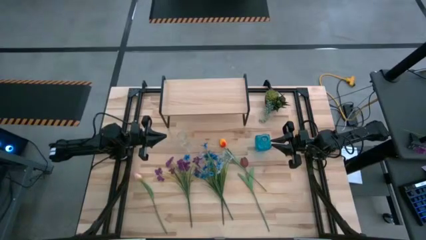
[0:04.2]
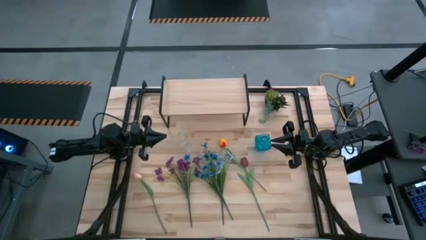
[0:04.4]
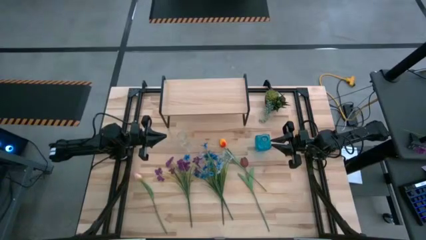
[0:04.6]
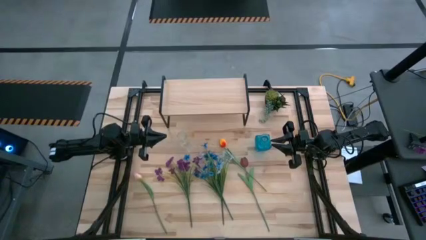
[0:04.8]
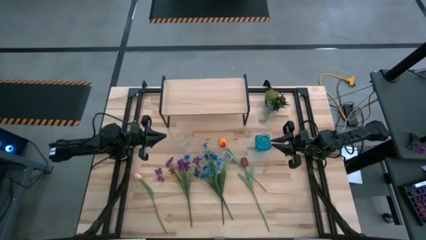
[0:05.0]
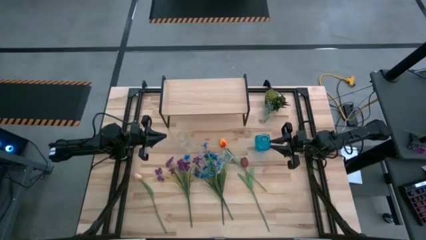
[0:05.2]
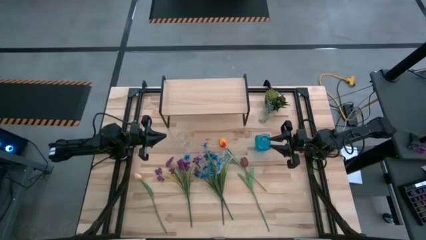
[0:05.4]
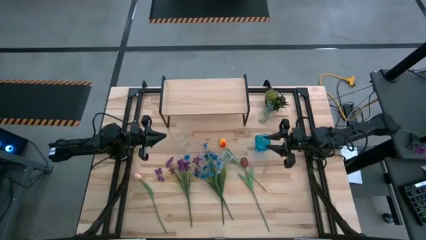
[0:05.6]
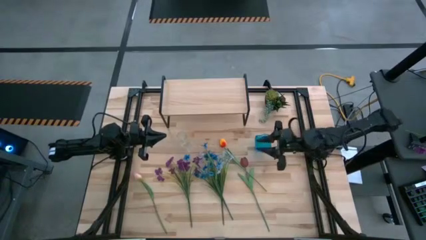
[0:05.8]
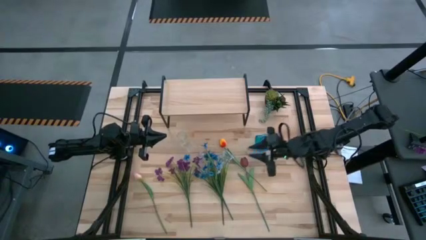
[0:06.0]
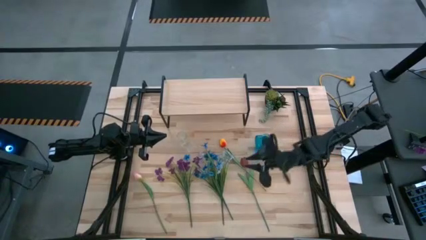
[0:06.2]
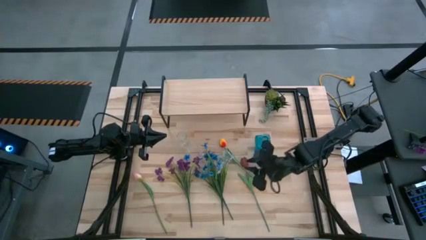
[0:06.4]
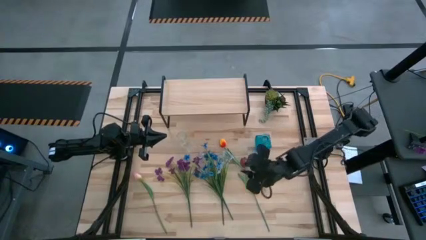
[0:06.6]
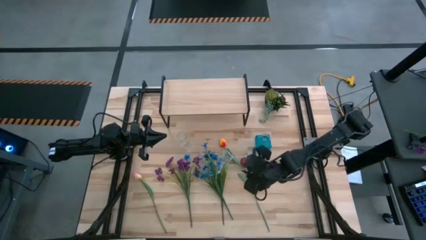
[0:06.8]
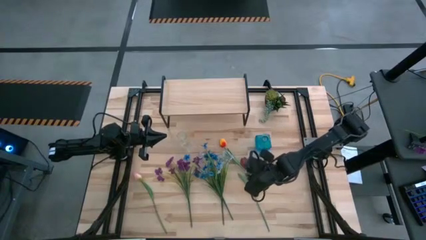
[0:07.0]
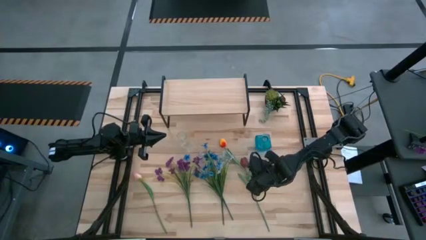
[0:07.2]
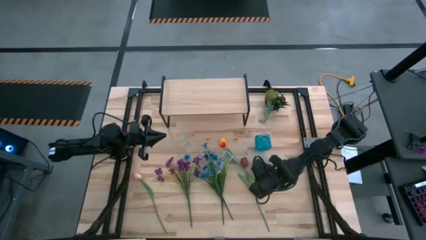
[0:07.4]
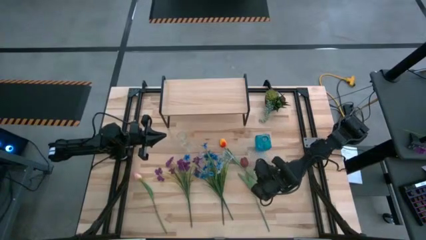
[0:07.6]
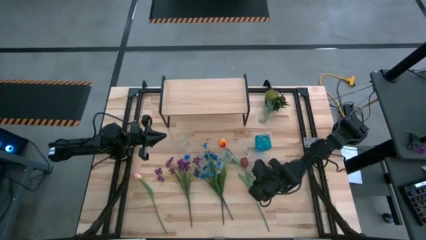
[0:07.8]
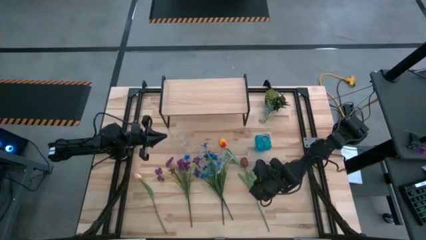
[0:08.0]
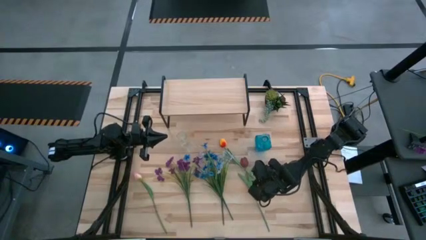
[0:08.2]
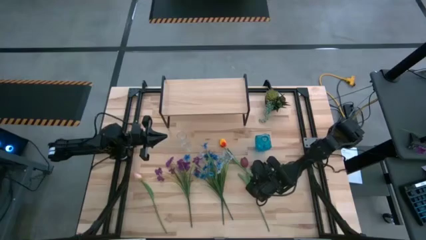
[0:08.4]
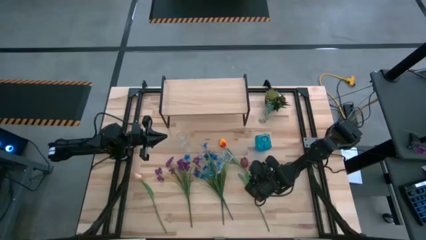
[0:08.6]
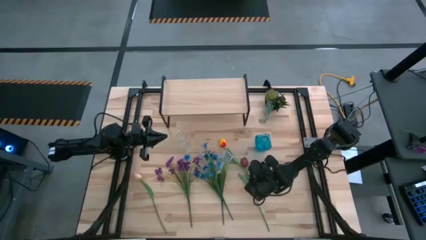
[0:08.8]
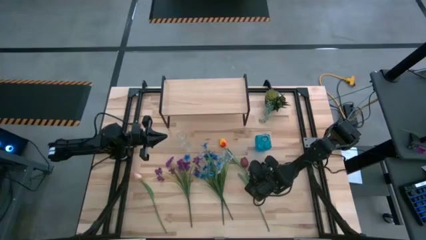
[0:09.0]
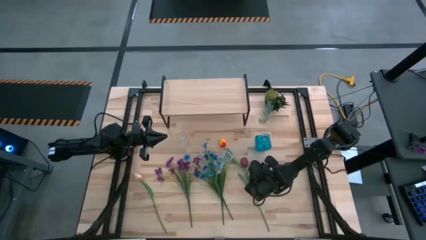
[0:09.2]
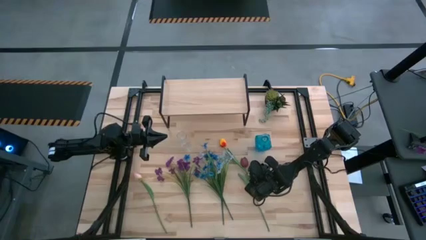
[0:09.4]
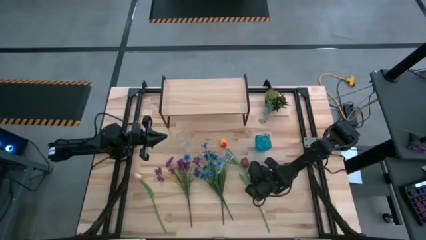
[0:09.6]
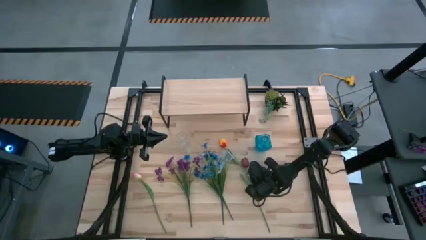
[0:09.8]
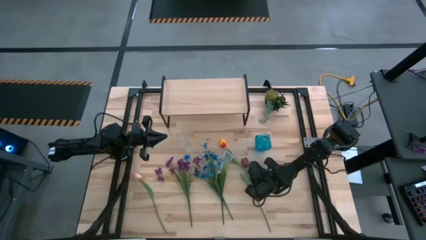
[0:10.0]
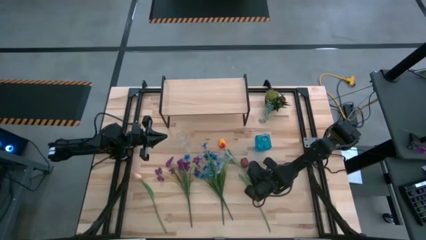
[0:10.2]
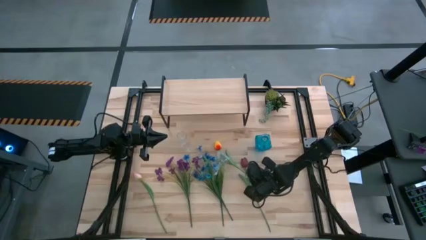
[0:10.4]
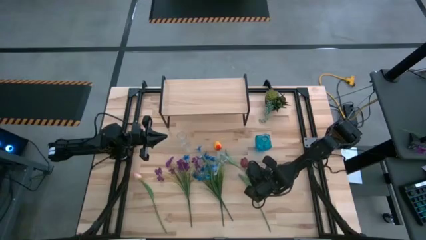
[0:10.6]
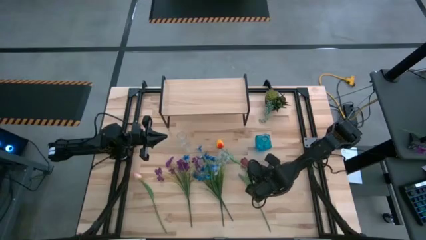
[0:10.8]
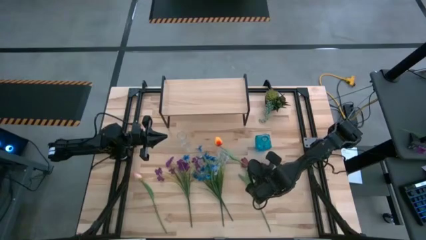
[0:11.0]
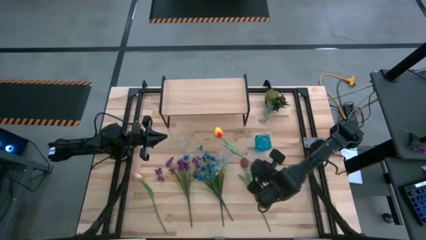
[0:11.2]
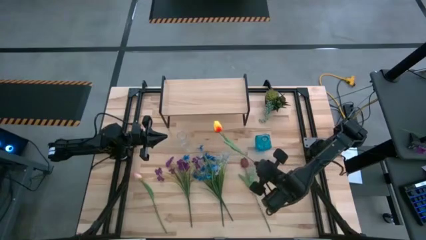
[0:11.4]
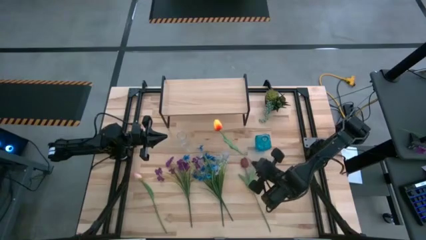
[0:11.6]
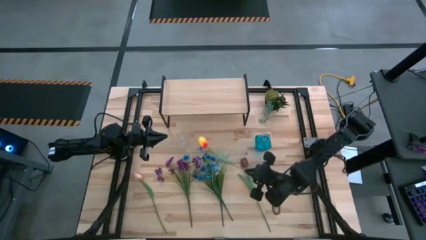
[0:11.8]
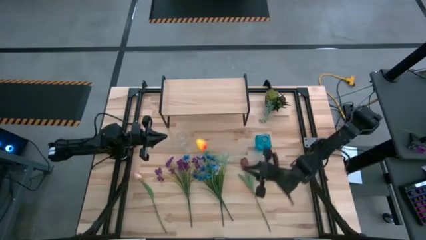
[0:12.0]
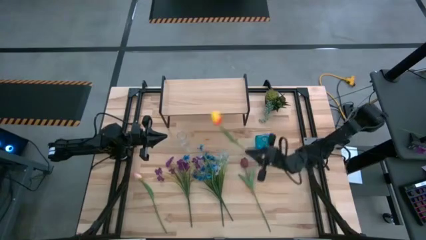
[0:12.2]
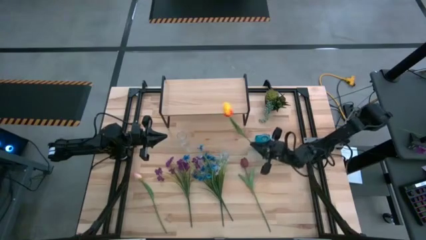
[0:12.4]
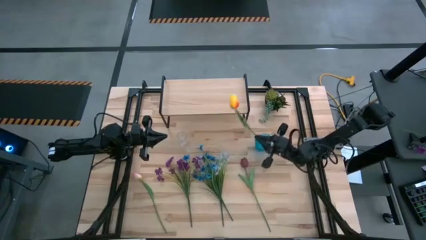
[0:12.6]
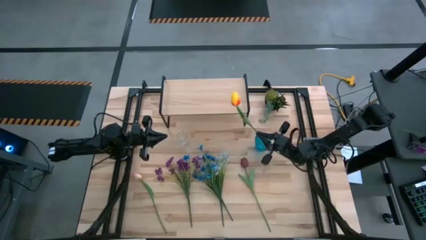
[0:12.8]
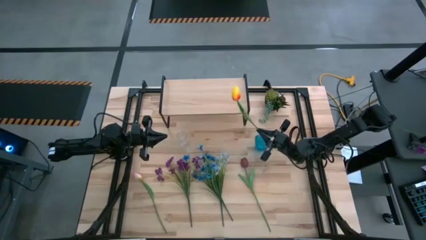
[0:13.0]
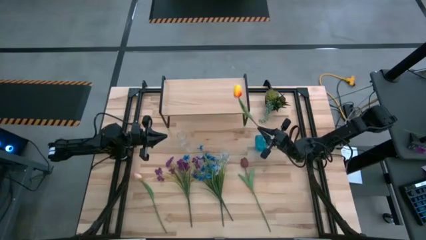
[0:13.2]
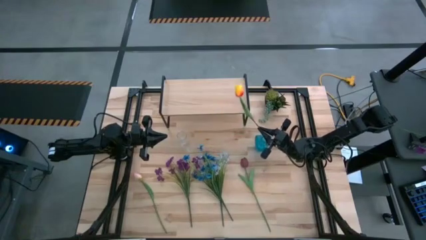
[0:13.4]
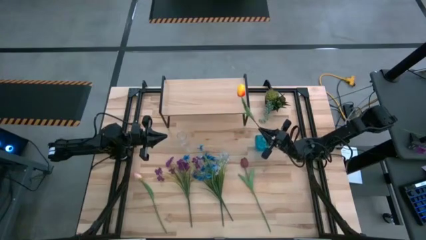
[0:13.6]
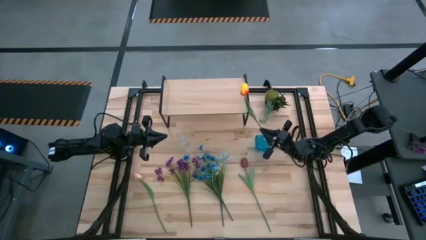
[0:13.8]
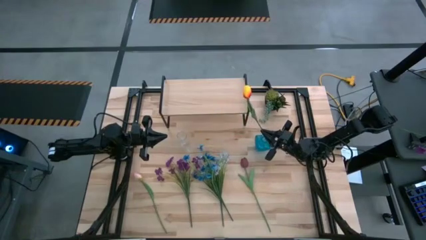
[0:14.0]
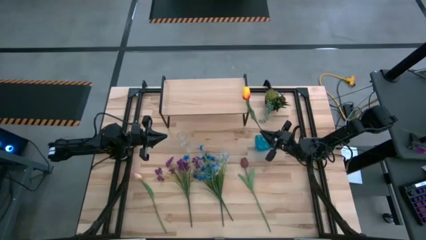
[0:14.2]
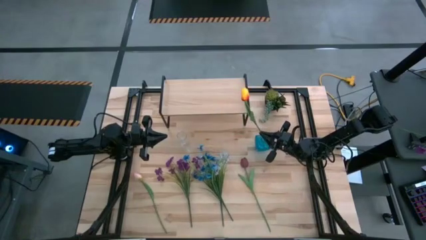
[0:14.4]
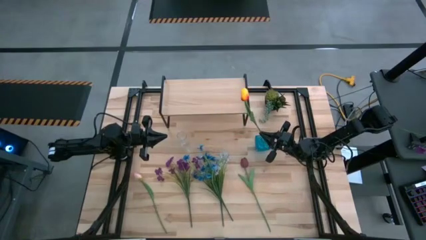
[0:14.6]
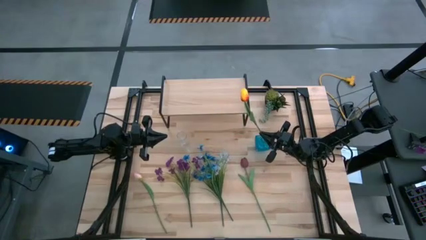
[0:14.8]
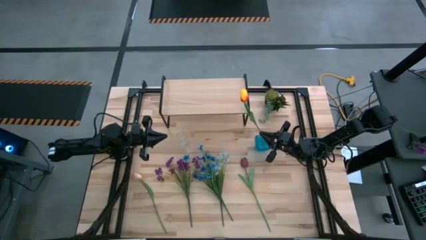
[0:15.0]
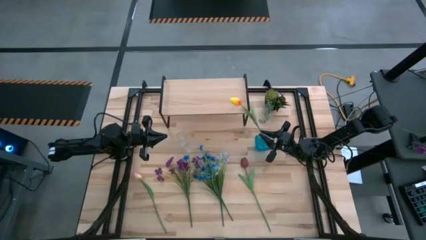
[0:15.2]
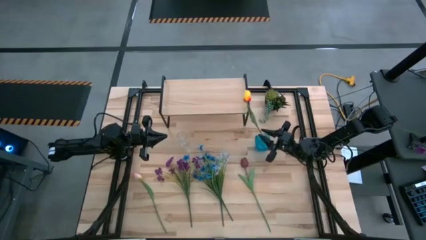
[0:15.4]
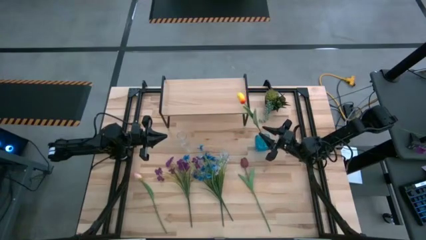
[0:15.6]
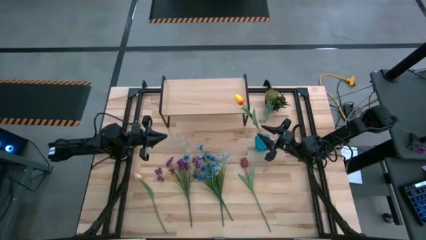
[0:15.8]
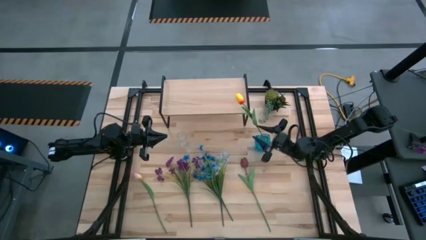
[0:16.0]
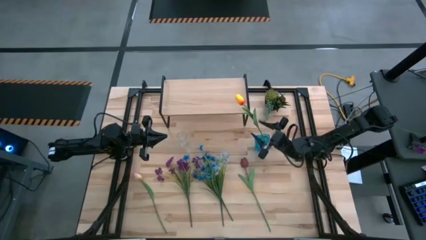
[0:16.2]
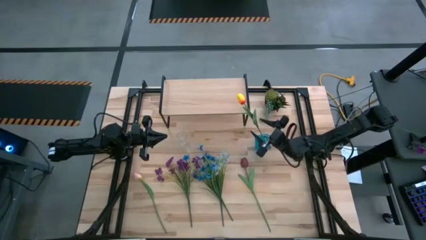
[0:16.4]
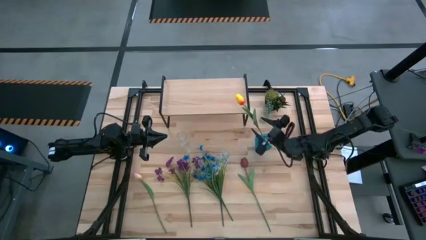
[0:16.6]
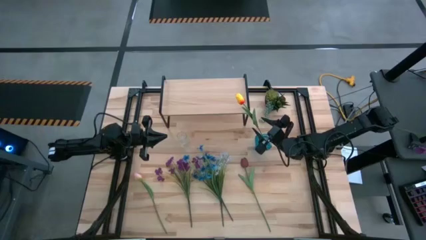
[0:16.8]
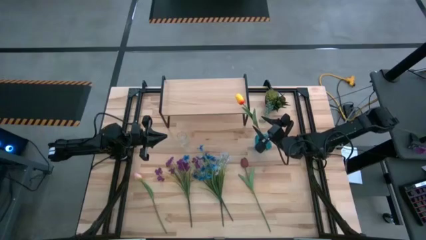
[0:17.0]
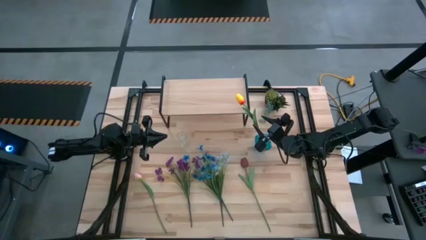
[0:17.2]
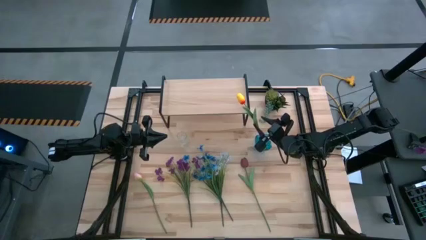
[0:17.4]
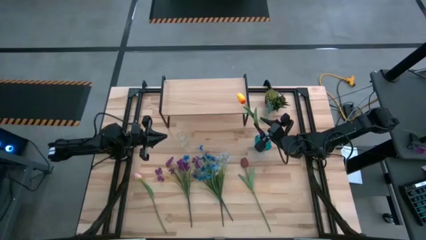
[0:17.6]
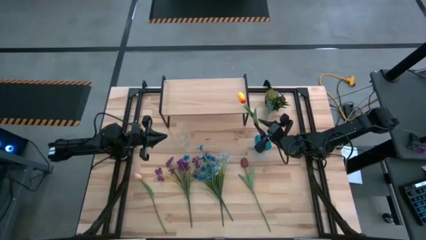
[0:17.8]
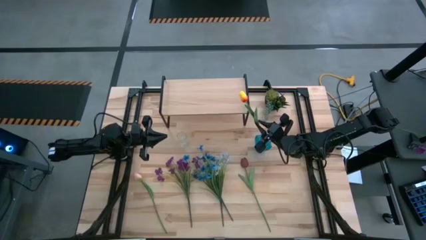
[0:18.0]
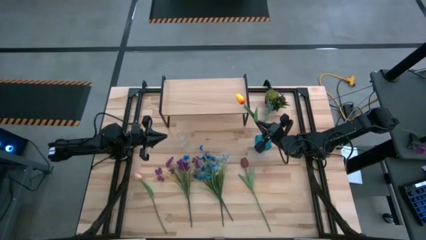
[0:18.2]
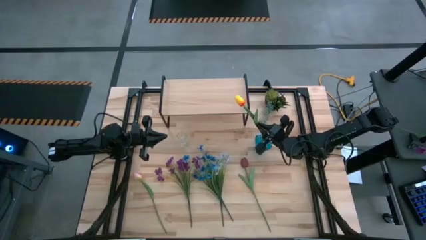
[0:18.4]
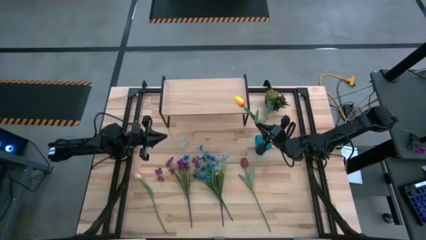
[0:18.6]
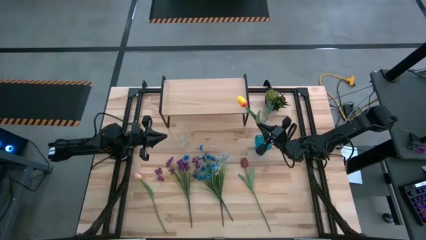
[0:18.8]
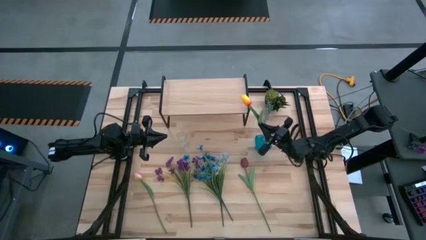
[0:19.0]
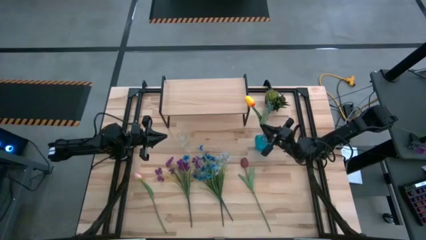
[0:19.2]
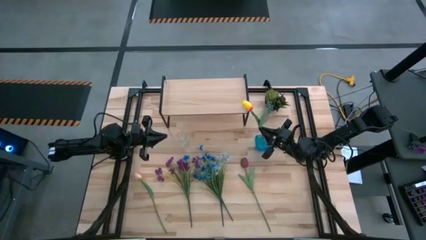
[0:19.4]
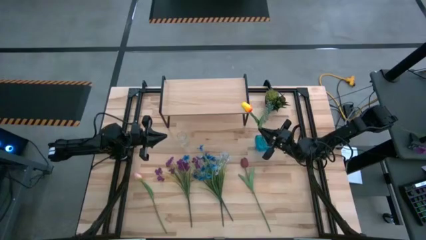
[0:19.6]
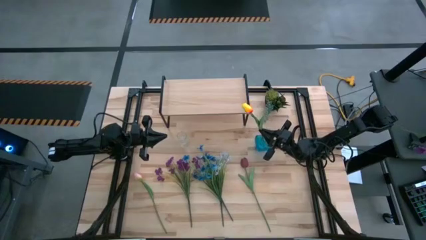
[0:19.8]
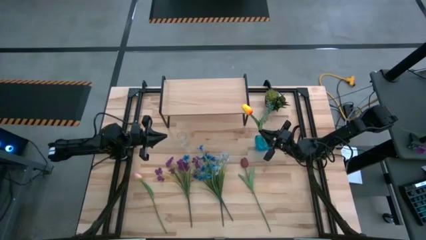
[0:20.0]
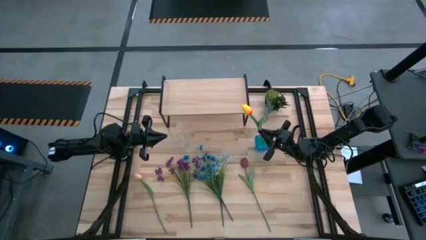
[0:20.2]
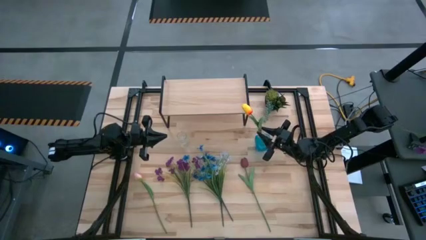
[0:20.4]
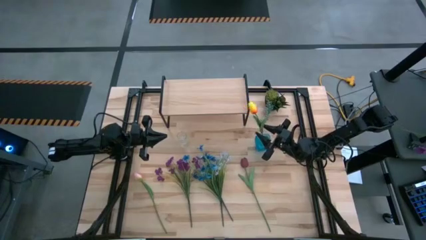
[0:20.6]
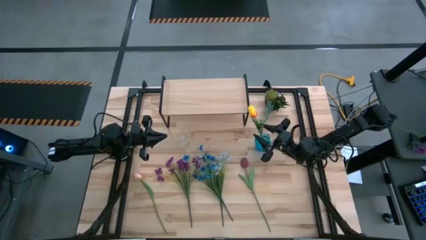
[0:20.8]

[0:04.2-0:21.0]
Task: Pick and place flowers into a vace then onto a shelf
Put the yellow tulip into the blue transparent vase
